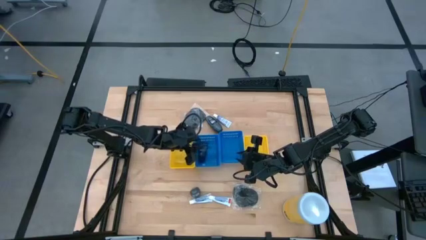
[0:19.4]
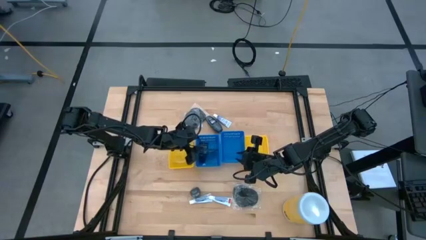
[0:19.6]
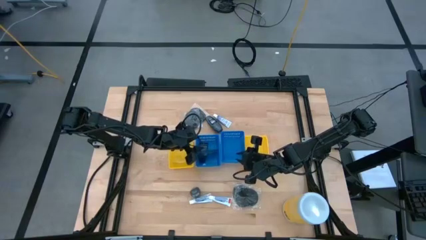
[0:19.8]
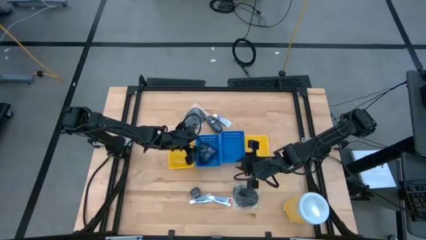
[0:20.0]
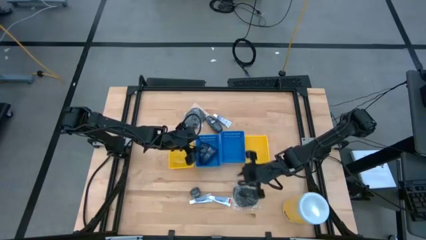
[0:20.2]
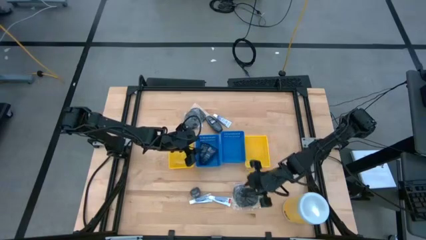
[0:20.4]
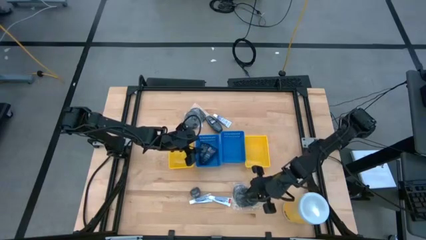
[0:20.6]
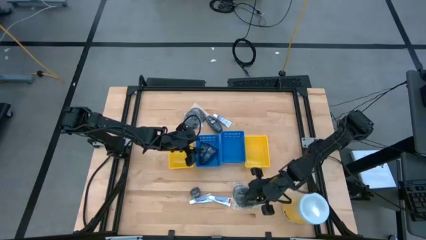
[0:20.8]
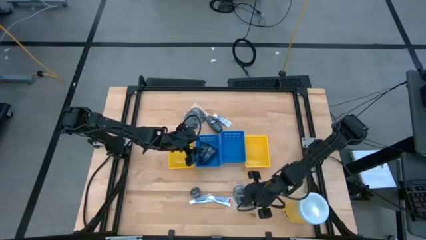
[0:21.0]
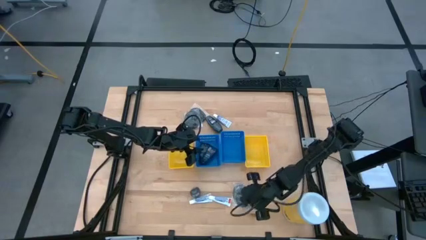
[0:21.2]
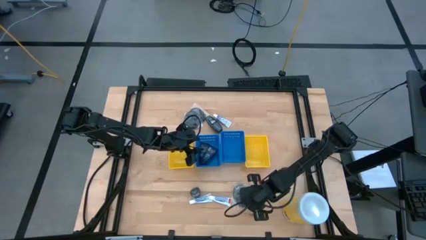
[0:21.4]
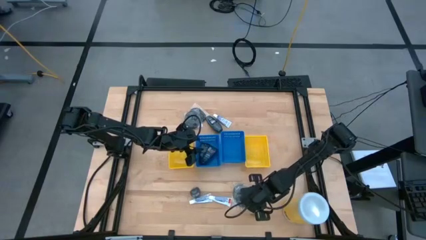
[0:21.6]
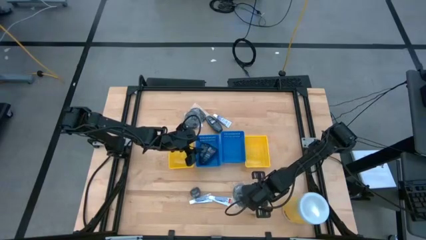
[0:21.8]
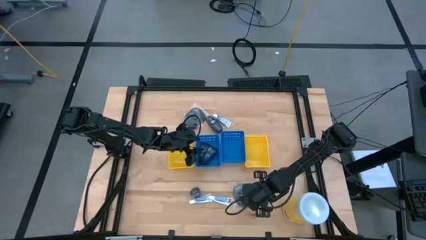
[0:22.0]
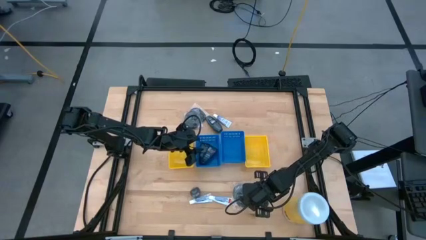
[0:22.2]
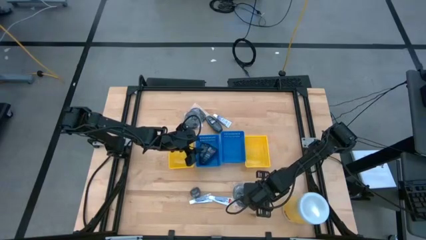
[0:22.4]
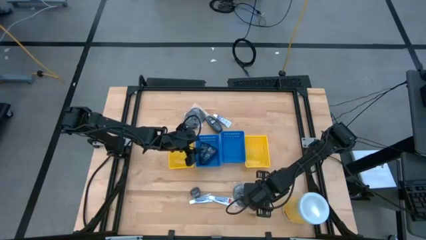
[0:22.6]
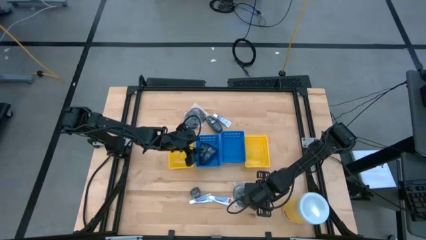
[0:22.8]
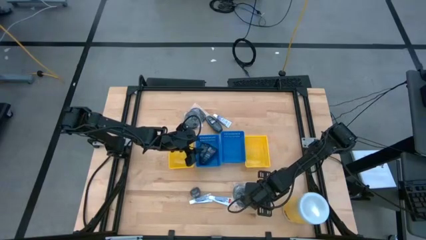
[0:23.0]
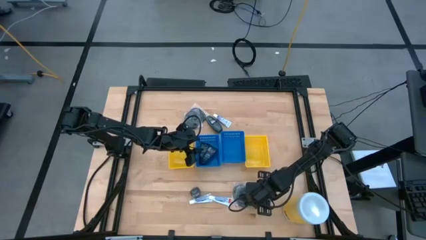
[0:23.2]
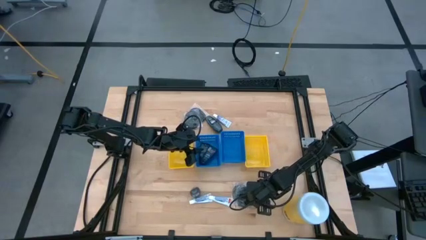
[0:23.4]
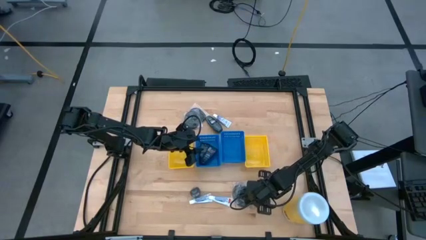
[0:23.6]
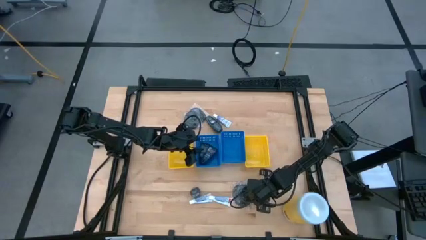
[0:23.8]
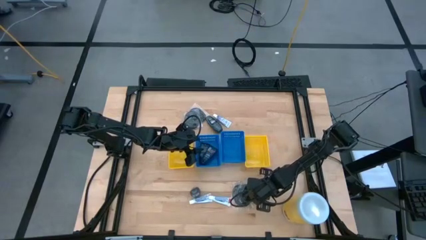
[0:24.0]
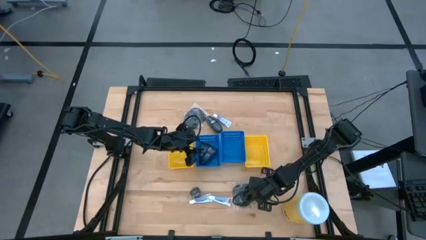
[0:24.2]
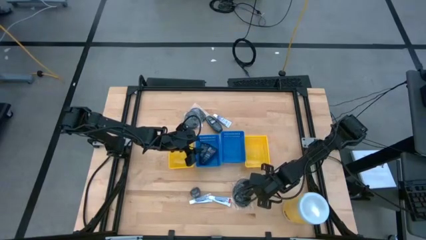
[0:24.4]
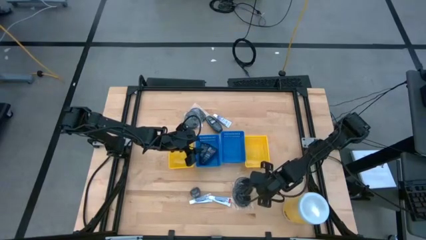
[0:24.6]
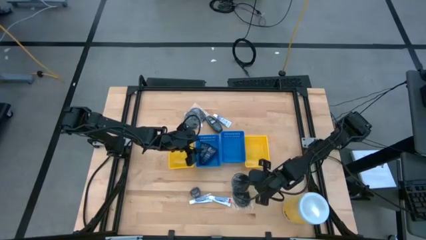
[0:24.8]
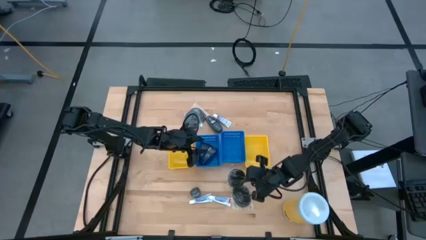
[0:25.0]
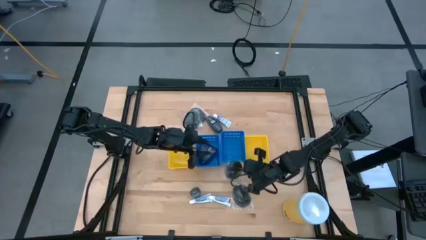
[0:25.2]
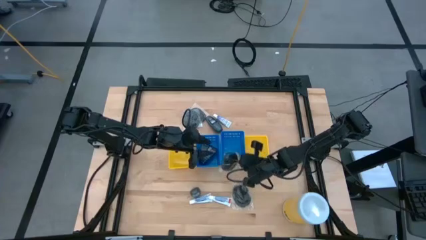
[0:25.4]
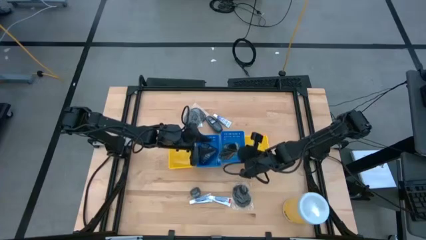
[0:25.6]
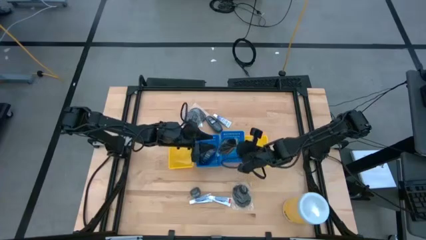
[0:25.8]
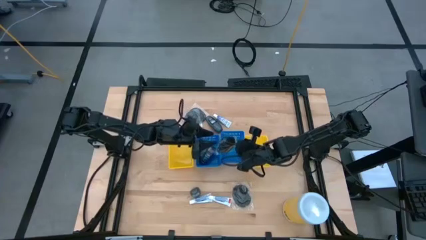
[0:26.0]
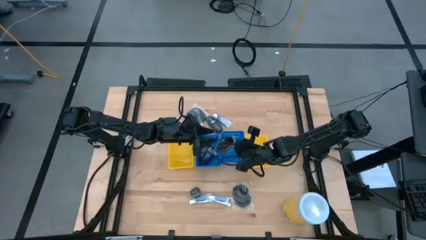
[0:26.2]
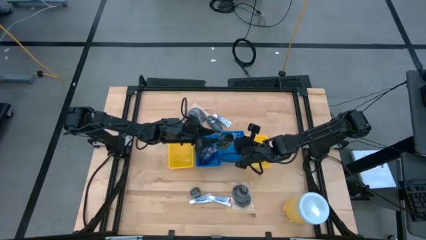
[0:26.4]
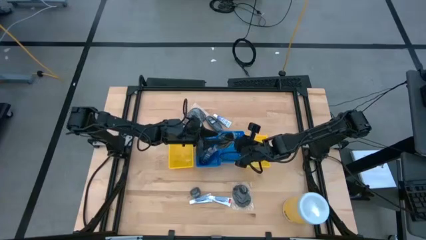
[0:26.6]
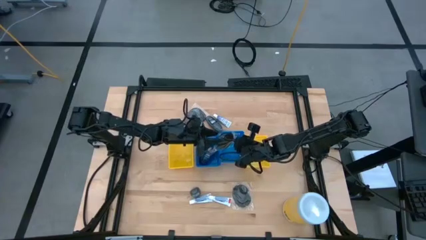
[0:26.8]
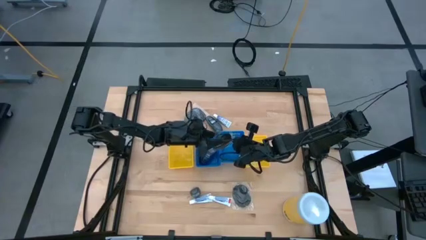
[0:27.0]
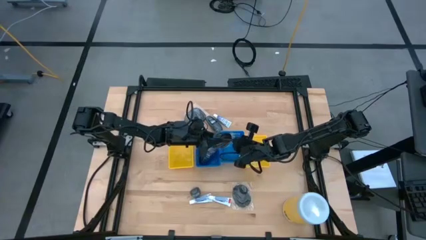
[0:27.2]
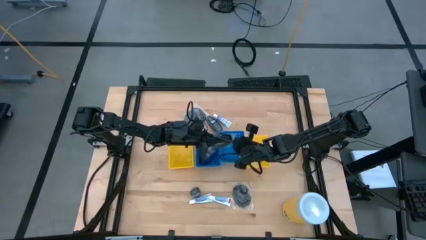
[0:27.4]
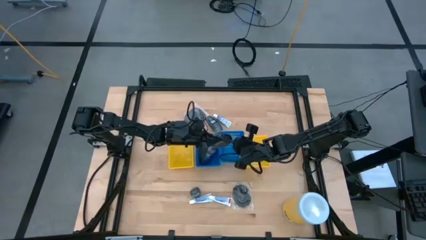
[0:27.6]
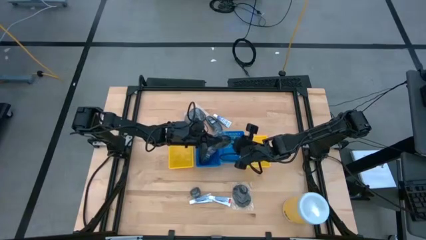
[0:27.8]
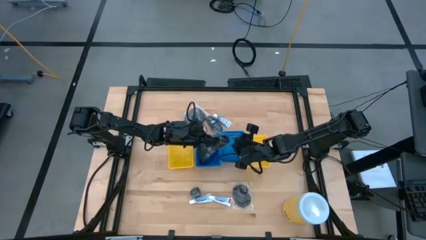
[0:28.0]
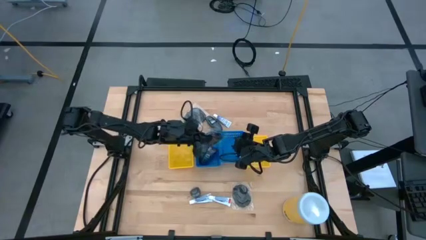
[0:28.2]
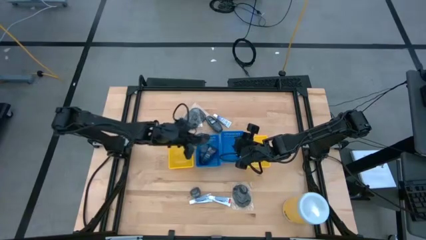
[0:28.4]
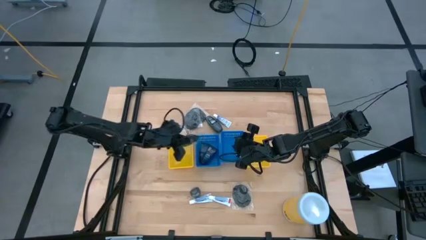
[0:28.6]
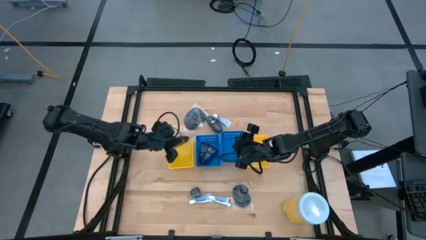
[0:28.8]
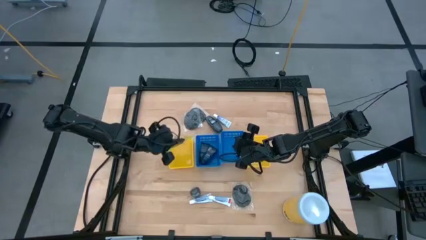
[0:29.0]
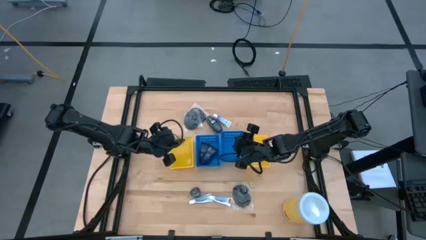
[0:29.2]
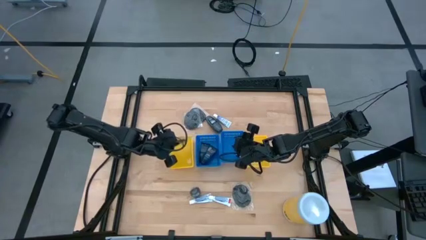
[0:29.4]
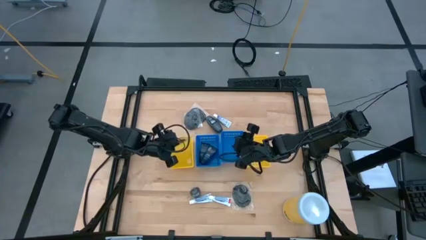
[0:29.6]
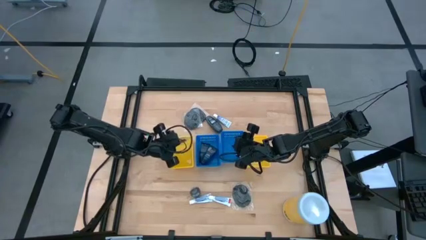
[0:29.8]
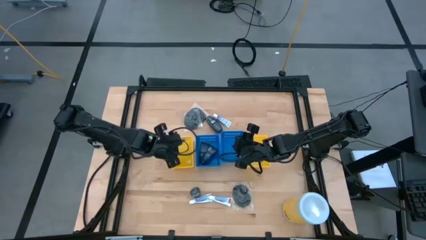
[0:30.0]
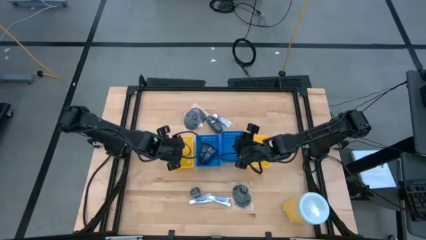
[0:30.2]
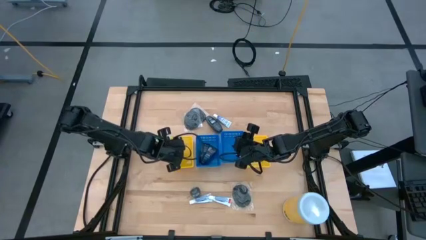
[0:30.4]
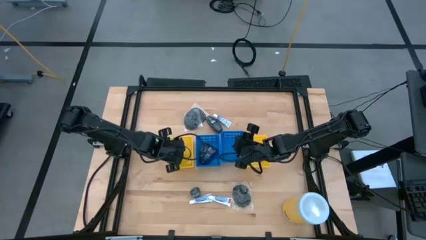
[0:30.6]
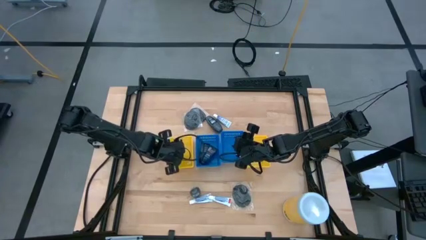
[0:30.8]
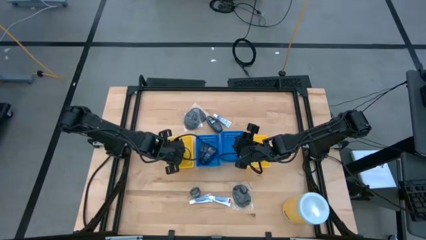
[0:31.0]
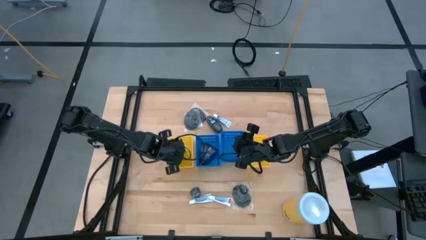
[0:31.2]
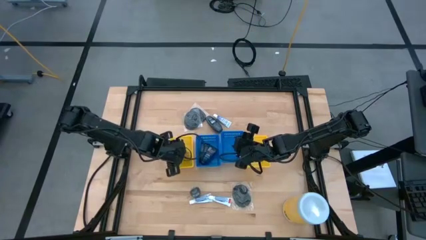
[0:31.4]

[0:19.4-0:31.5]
Task: Pick & Place Travel size toiletries
Put the hairbrush into the left yellow bin

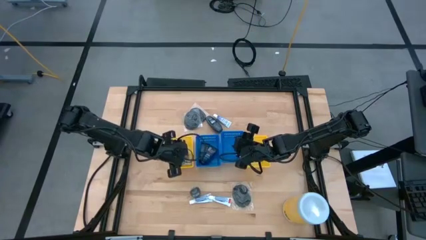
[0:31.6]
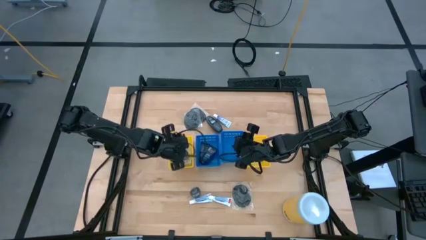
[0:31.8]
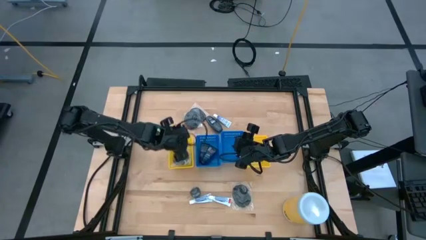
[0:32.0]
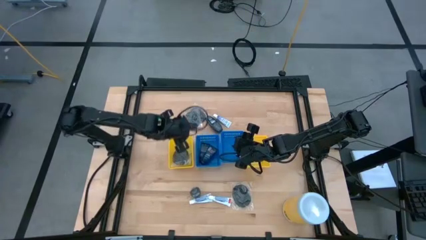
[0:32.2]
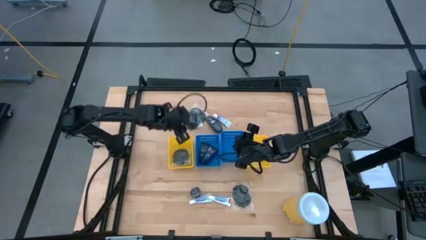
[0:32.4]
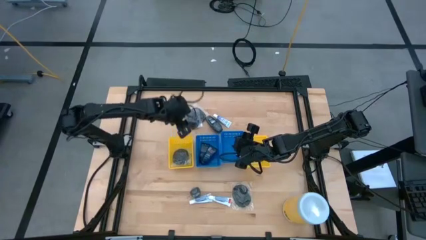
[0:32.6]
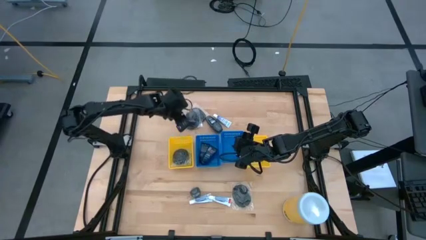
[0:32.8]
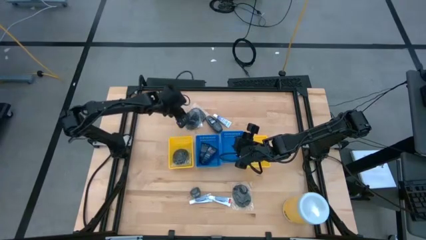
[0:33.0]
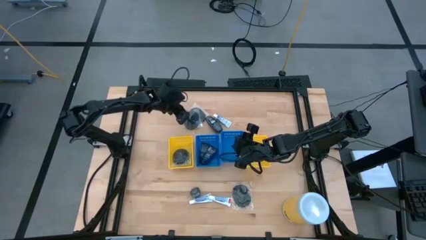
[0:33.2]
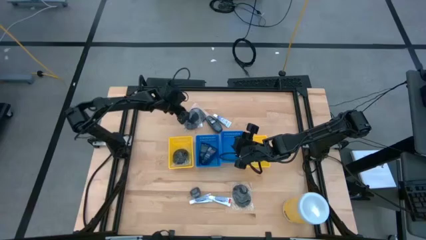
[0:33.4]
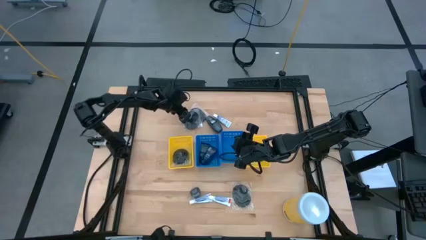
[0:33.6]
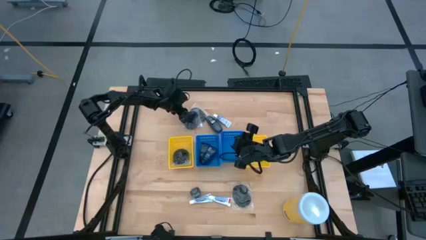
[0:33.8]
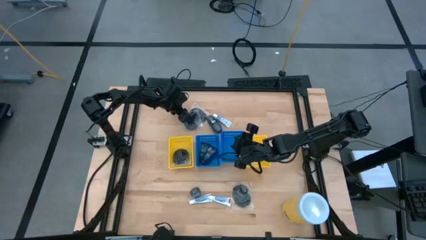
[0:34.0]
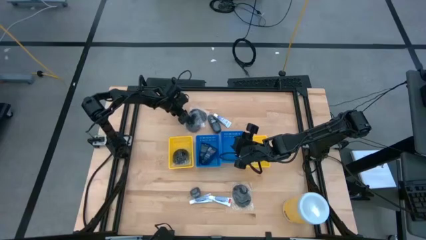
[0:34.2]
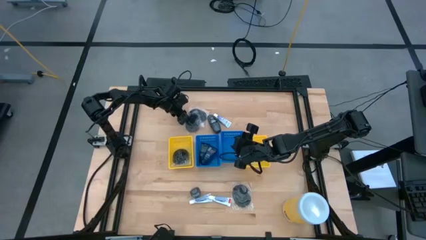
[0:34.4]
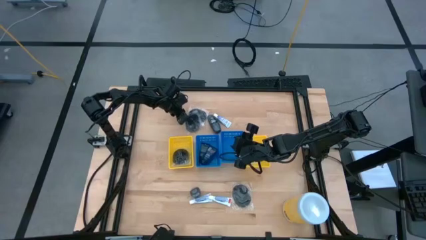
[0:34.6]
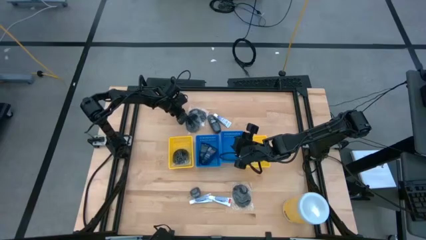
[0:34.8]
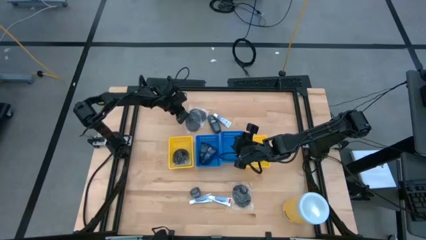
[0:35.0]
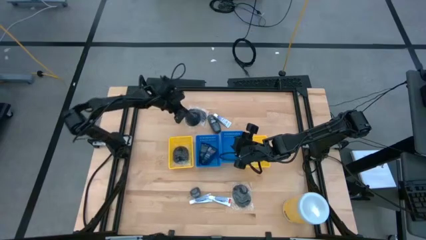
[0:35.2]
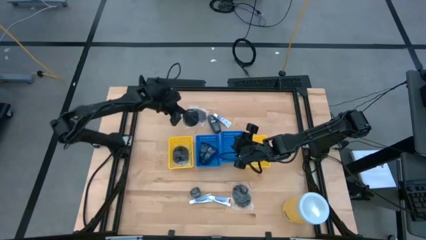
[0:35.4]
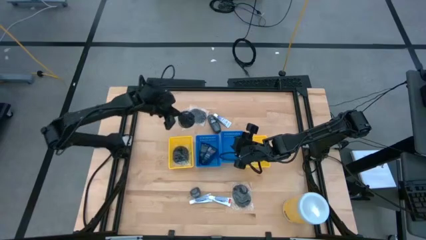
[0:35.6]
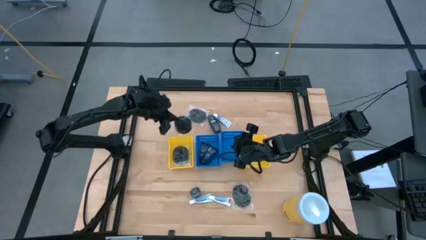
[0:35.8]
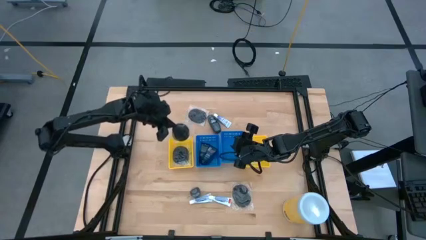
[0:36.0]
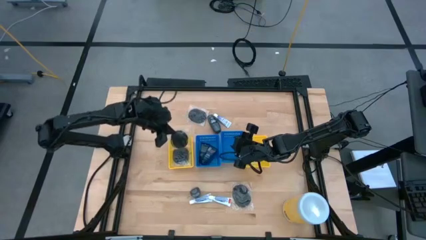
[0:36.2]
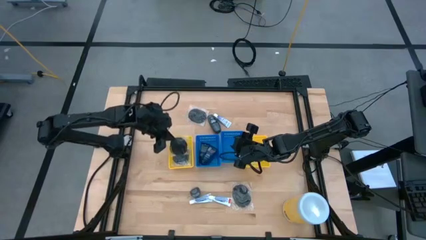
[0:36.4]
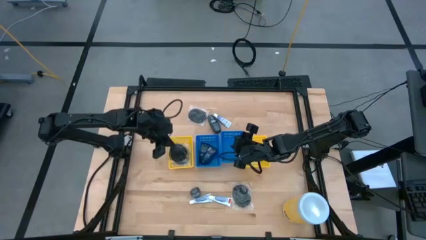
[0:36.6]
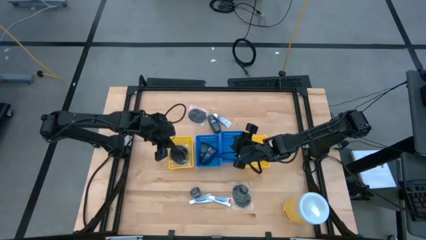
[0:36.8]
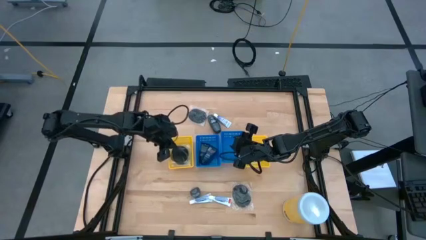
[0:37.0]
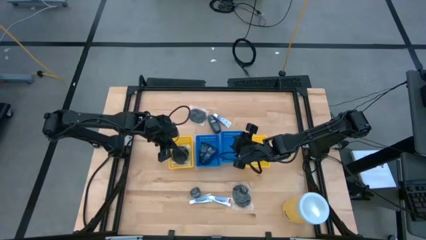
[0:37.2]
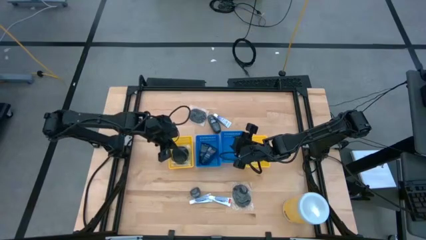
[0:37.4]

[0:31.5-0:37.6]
Put the hairbrush into the left yellow bin
